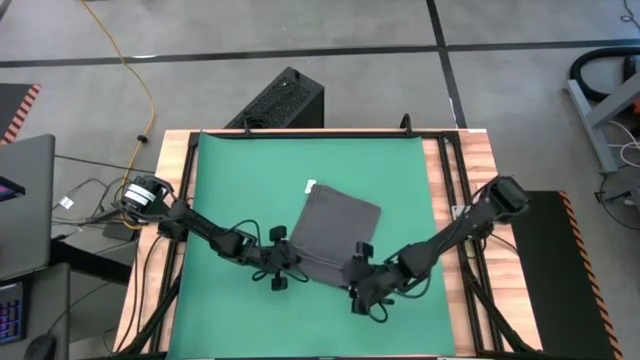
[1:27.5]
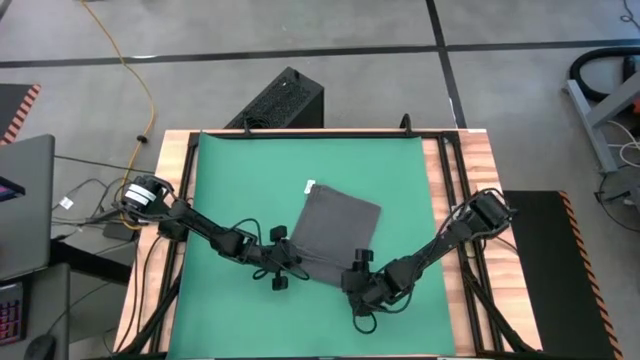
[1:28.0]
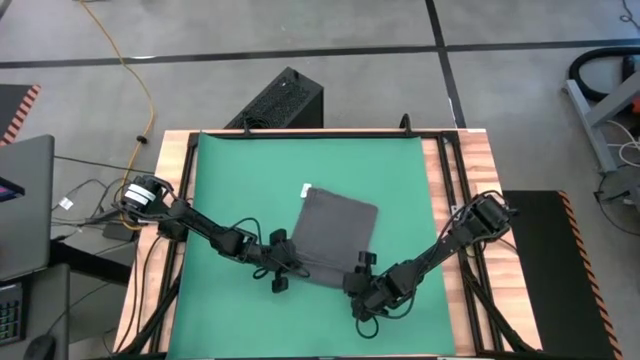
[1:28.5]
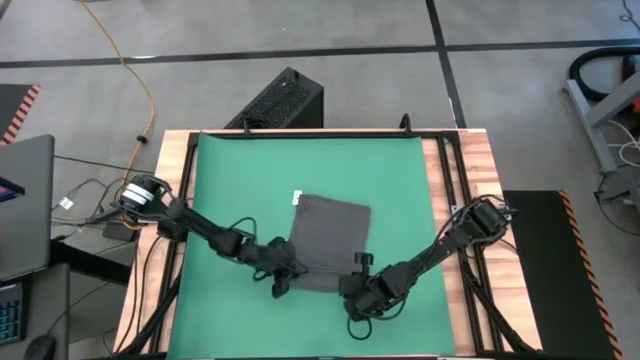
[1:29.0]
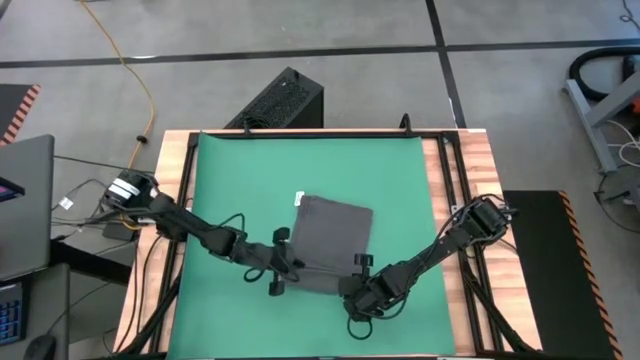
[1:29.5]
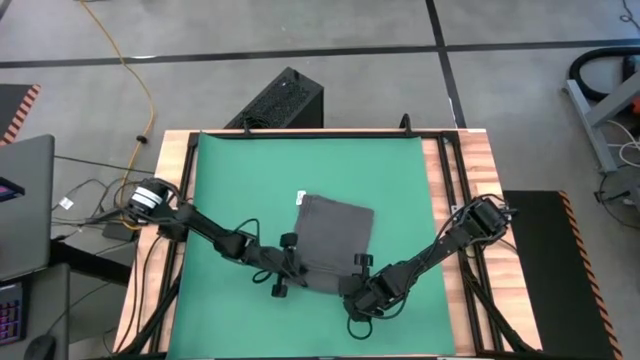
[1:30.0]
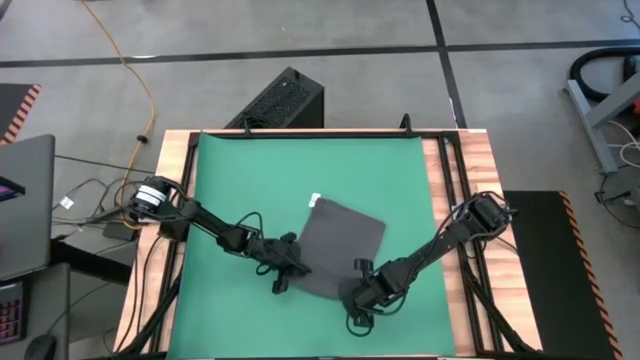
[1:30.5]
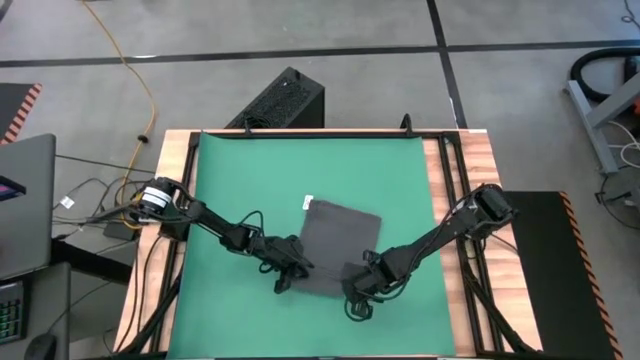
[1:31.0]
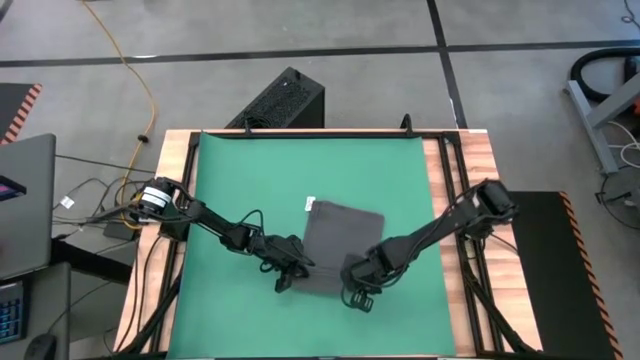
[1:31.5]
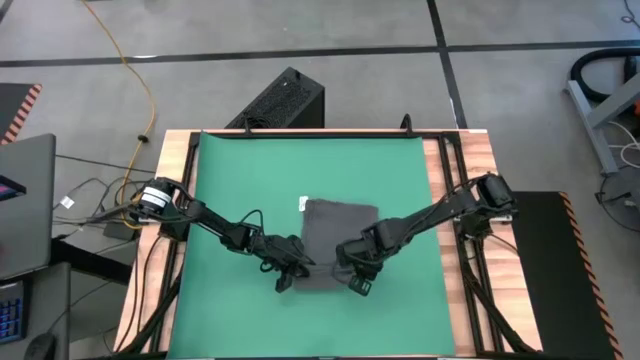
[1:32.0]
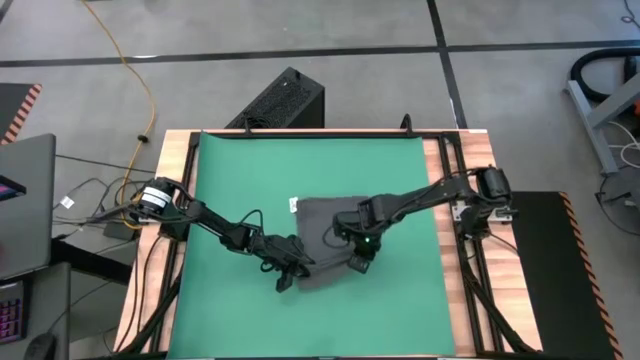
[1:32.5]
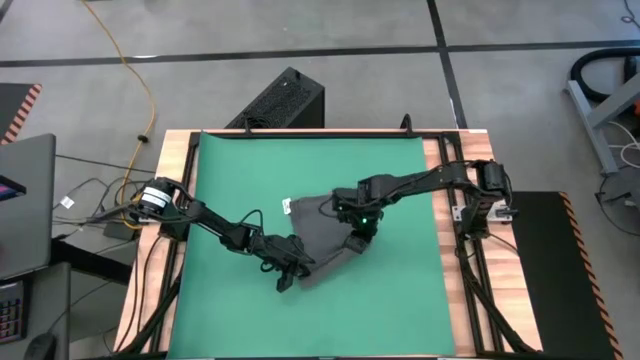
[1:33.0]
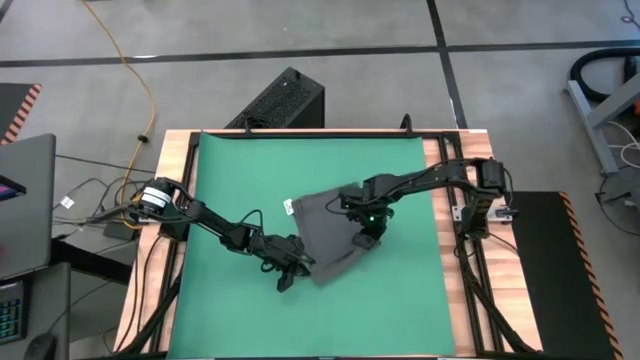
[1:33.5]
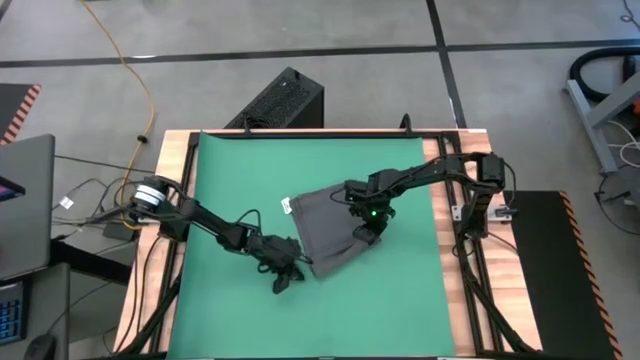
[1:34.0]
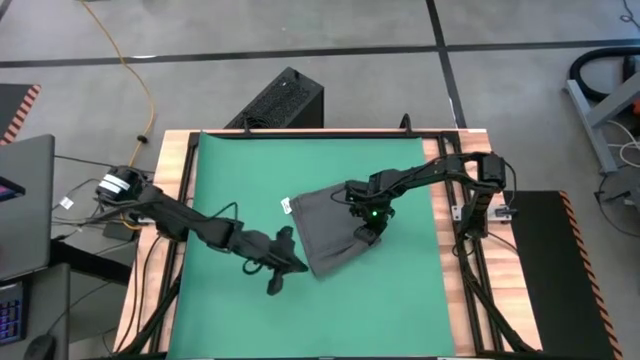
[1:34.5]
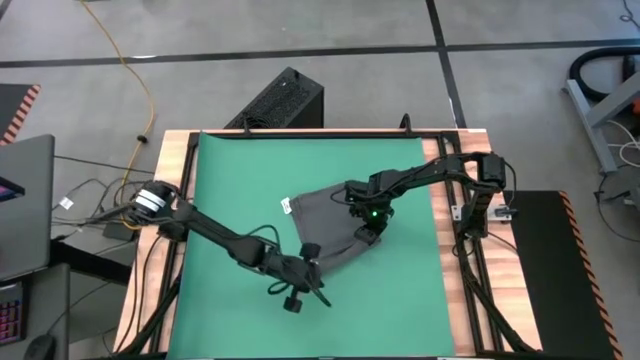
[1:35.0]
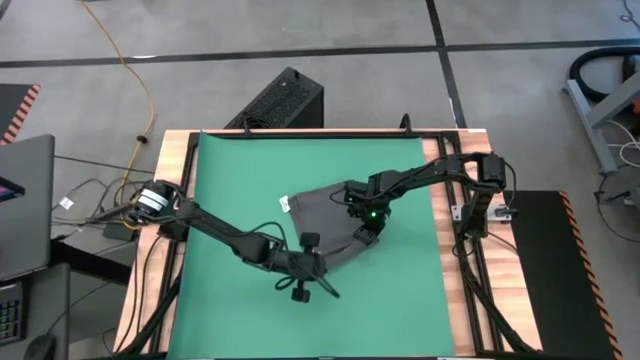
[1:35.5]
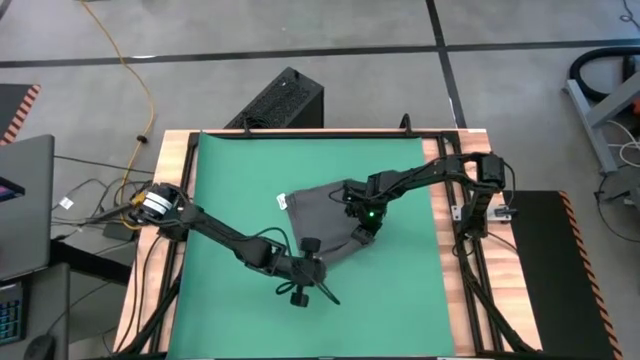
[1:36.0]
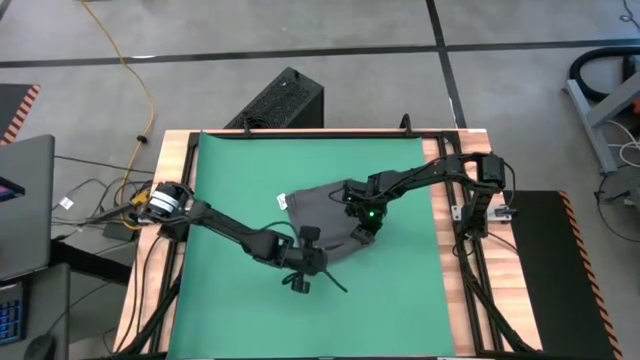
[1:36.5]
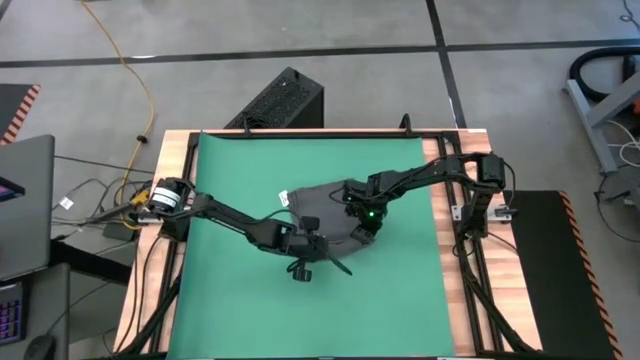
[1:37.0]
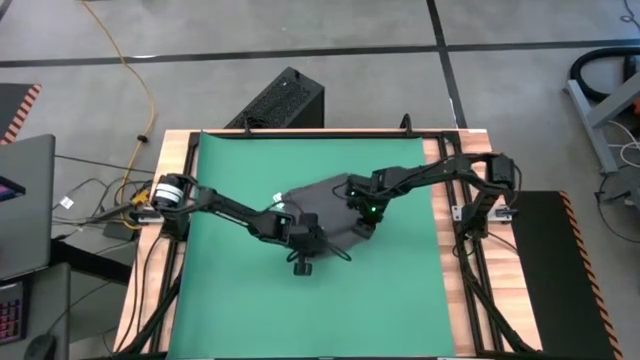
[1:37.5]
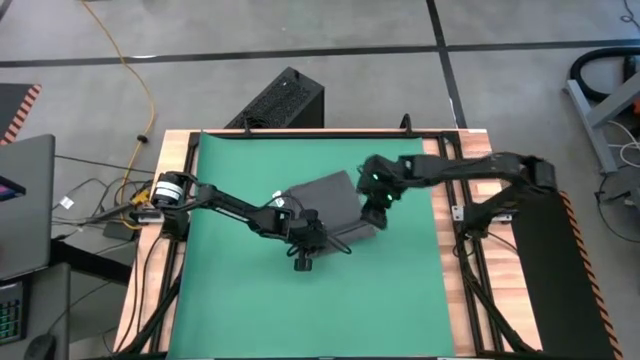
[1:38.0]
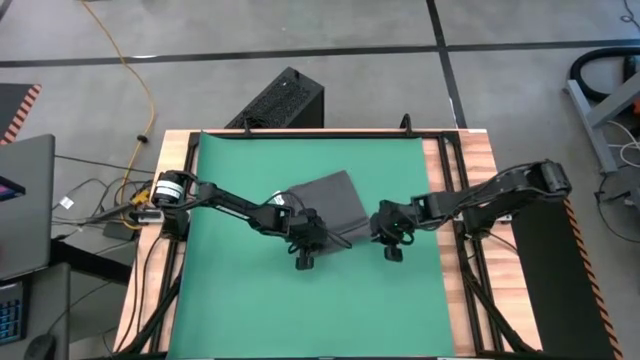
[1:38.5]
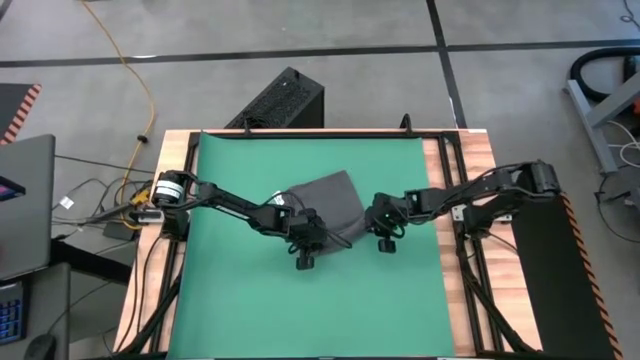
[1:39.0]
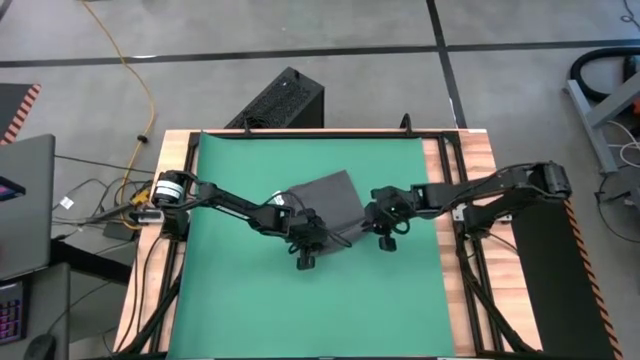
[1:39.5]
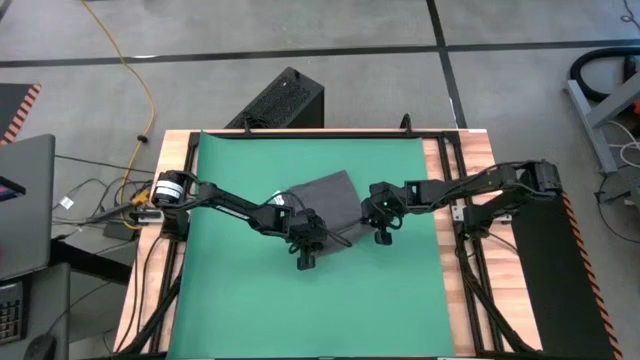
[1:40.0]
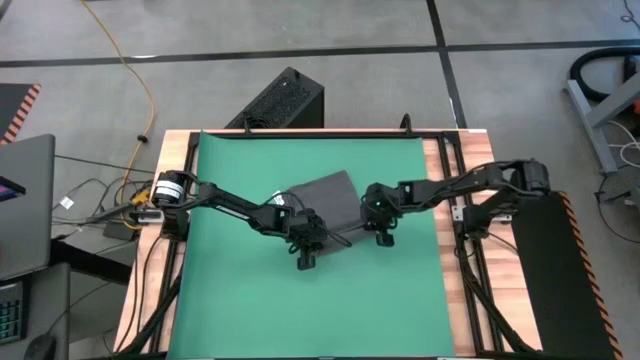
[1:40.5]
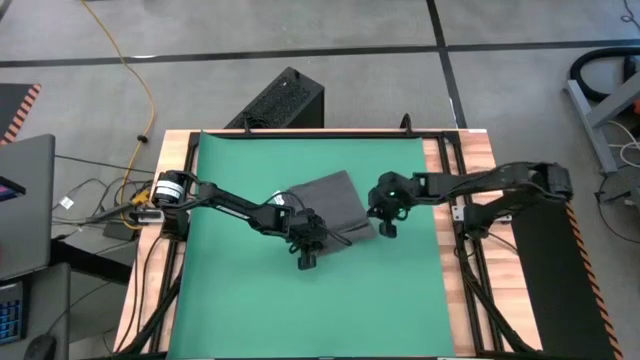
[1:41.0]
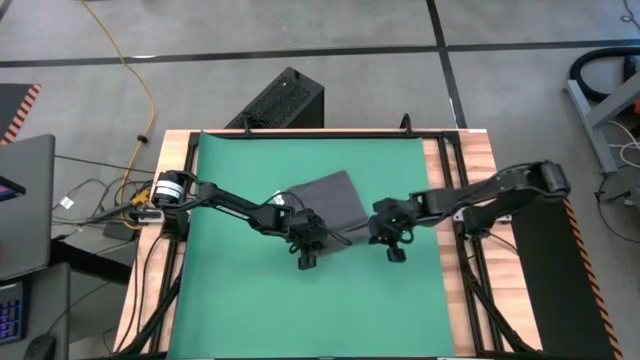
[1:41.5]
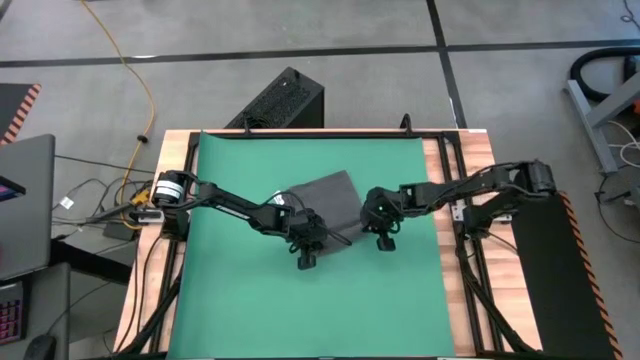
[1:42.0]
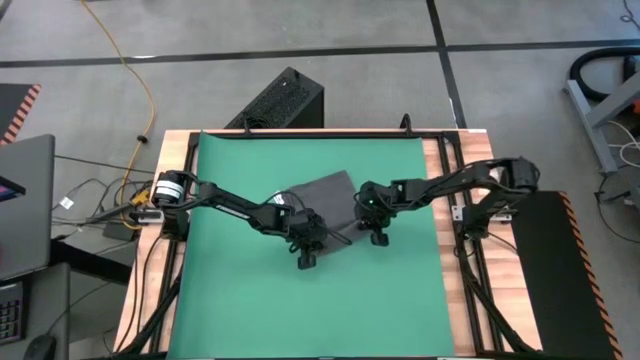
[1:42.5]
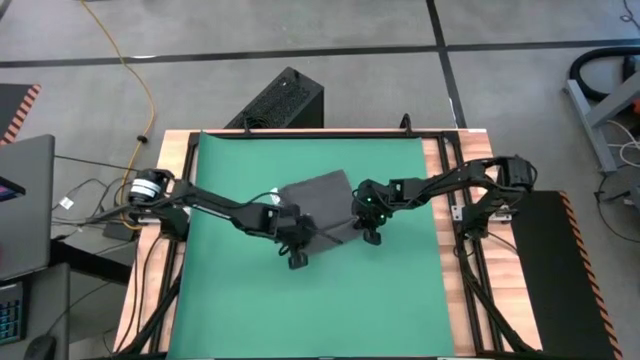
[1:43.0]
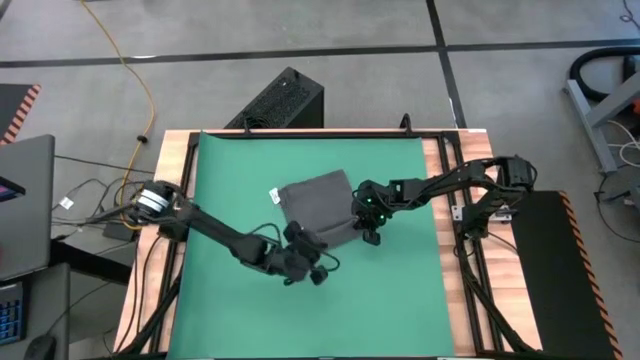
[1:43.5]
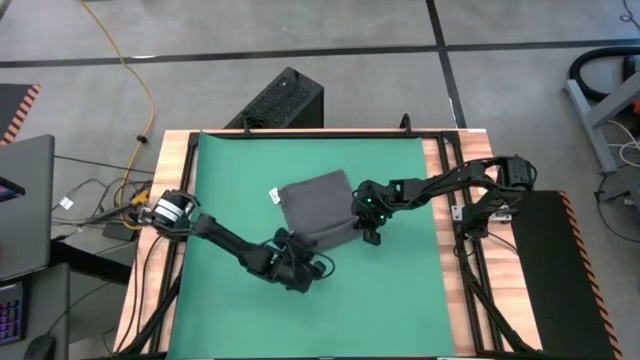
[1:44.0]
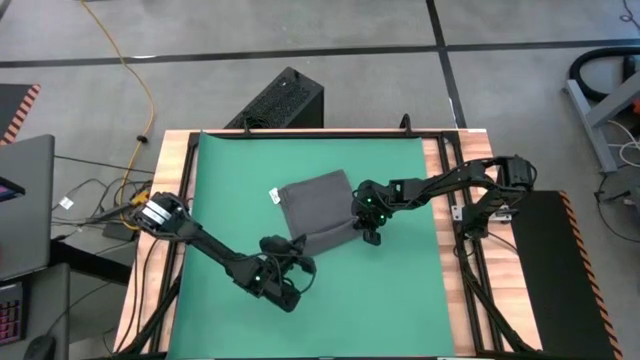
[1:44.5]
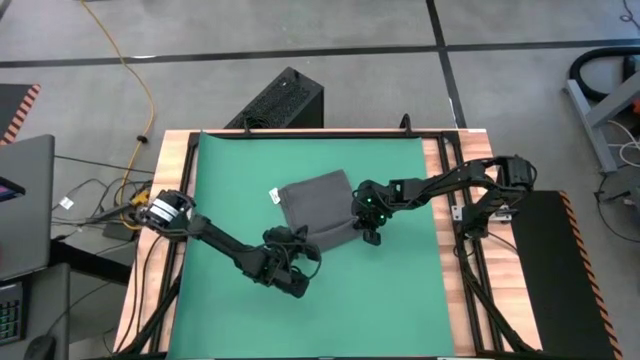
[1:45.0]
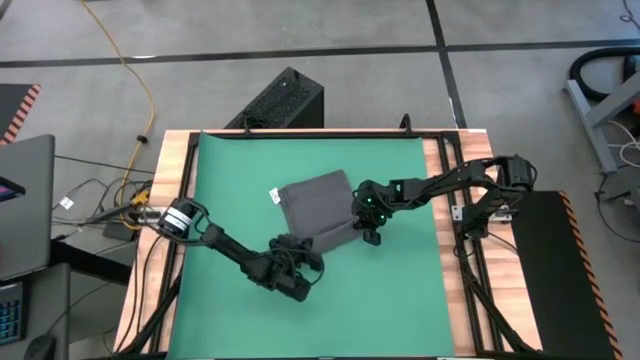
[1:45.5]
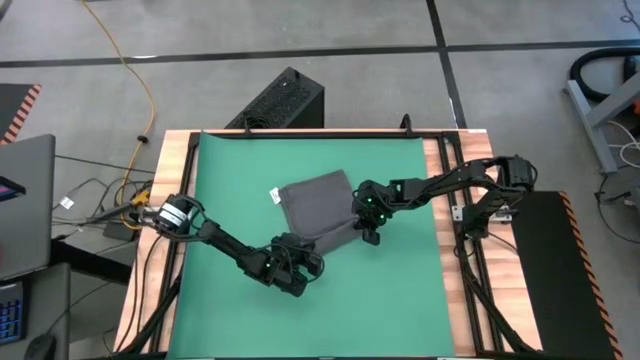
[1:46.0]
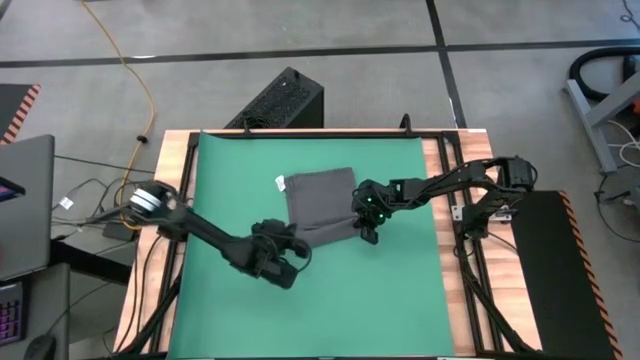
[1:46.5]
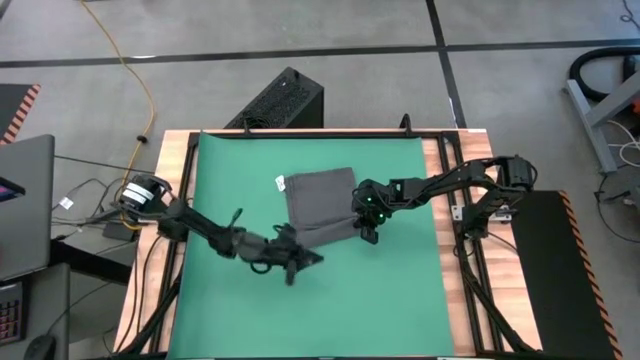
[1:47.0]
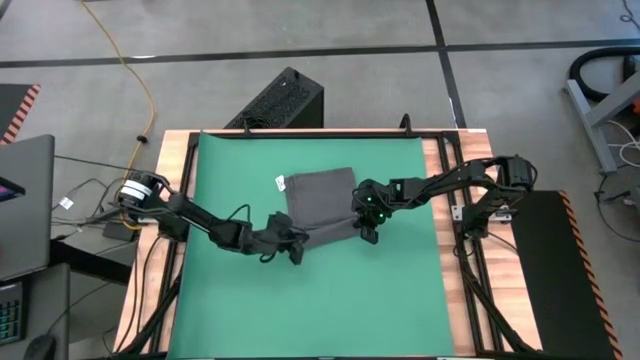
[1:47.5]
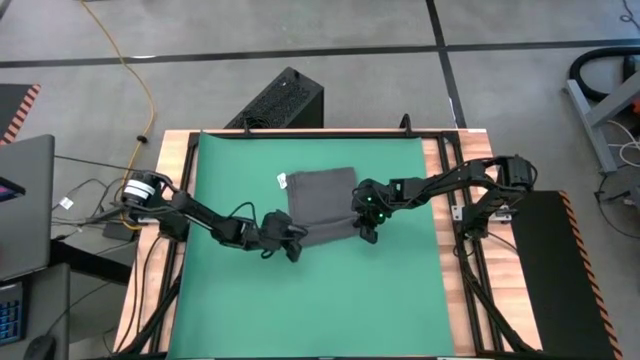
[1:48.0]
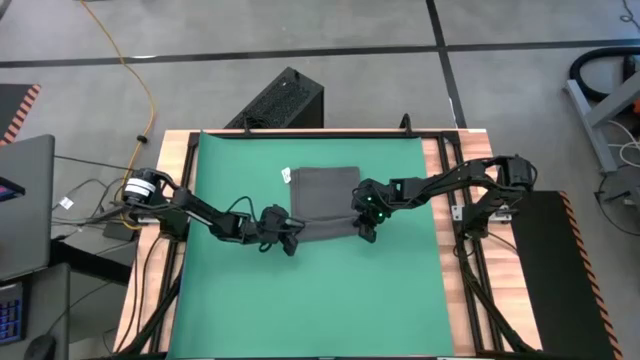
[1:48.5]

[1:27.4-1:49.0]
Task: Roll towel into tight, uniform cylinder
Roll the gray towel
